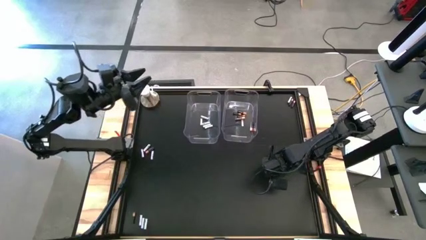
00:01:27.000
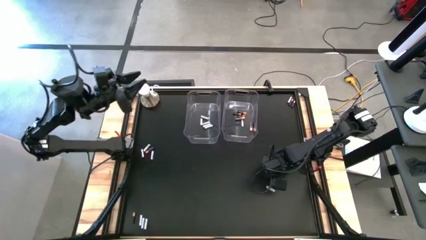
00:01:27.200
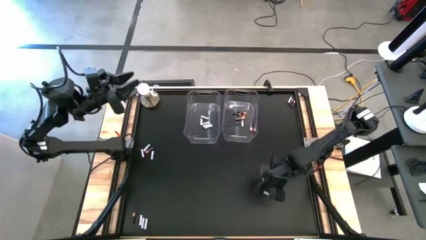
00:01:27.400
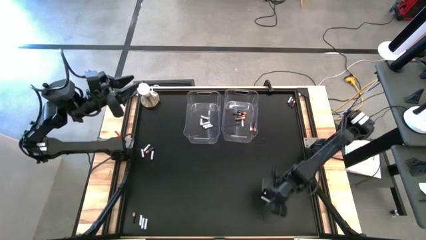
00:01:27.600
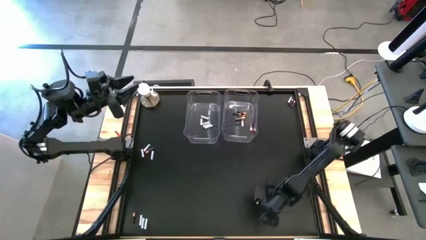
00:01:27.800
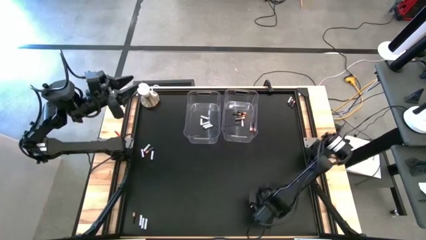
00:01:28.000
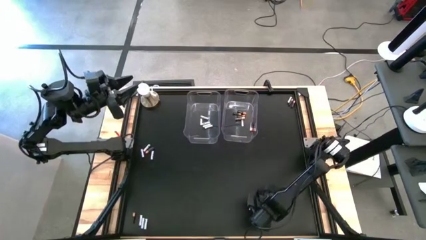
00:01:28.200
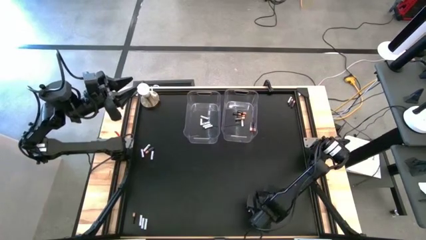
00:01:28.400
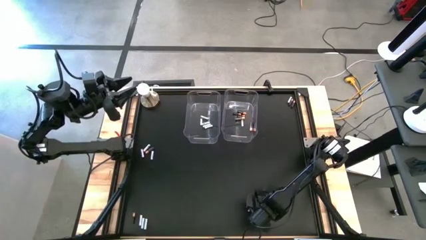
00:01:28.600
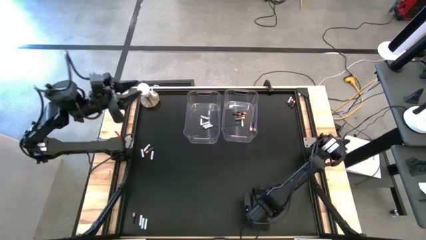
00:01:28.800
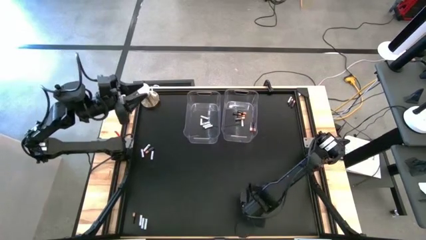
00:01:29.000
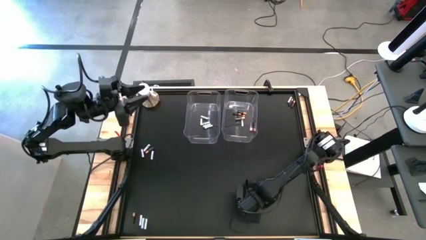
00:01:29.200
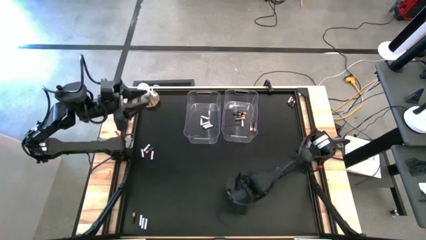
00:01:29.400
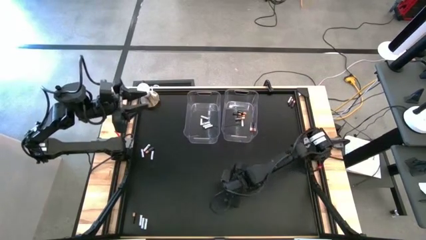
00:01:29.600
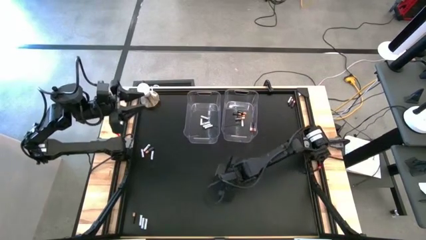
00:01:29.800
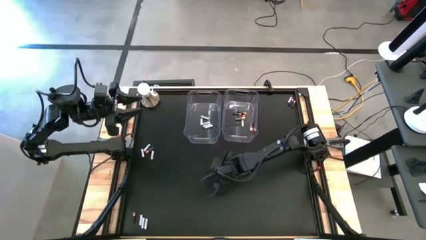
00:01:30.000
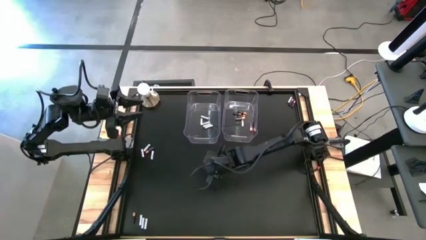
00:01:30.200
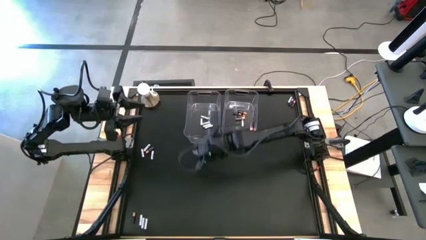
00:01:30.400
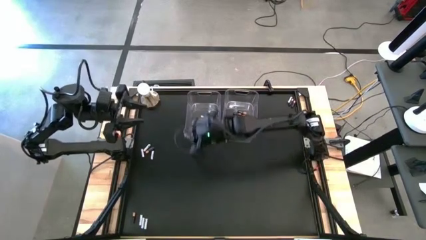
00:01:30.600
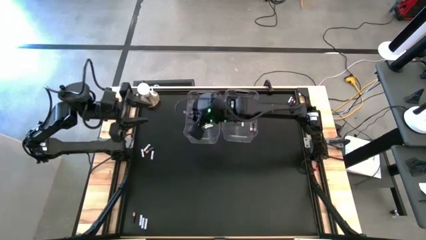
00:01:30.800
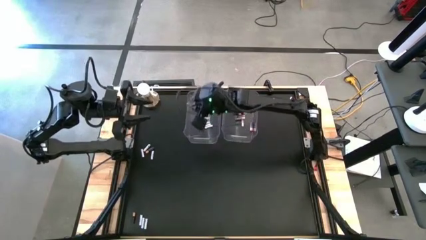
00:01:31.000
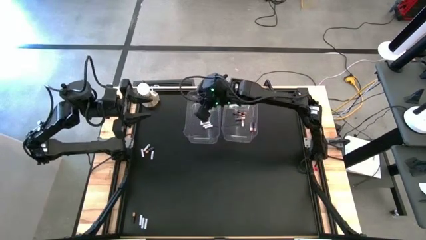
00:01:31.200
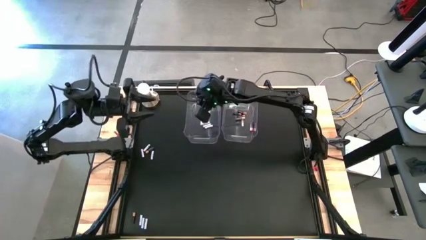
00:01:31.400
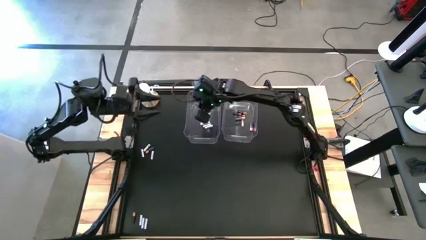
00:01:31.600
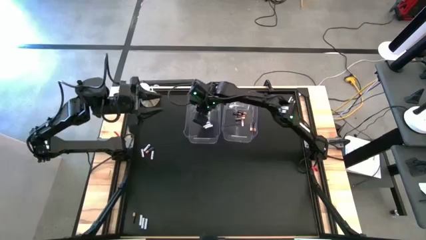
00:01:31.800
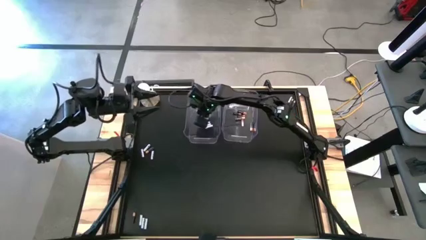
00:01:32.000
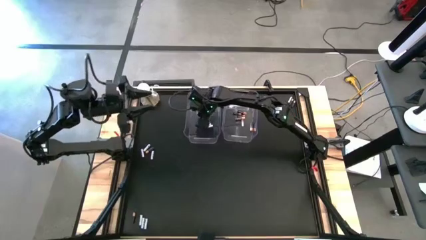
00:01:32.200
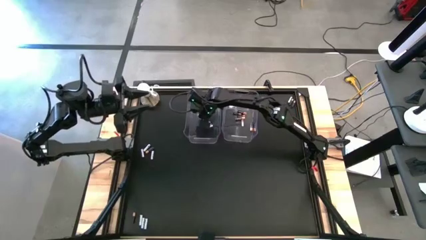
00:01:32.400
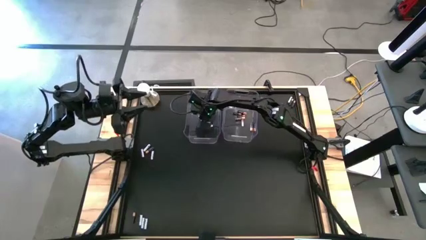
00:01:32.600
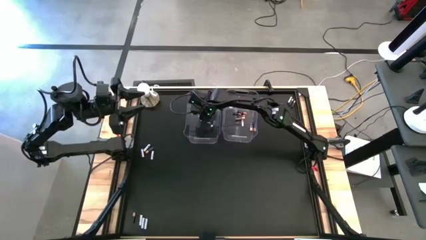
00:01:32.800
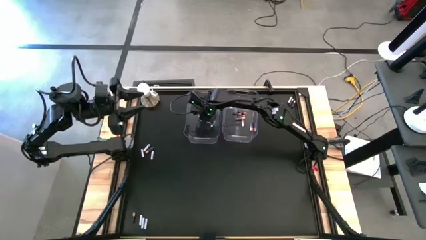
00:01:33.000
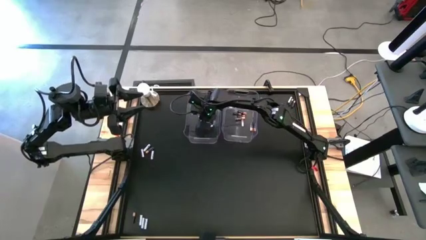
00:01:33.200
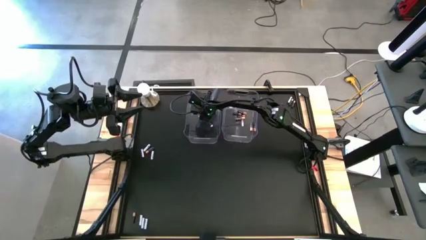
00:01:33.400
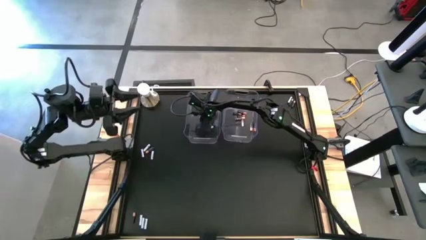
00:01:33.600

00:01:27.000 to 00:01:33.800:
Task: Sort batteries
Put the white battery into the left transparent bin

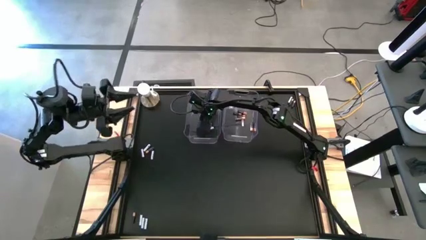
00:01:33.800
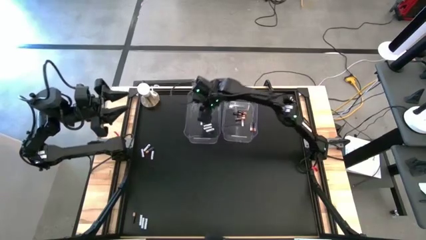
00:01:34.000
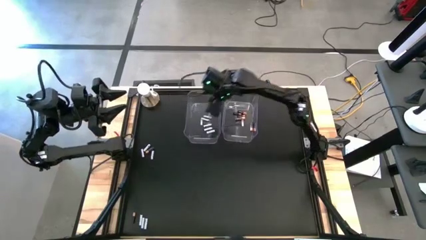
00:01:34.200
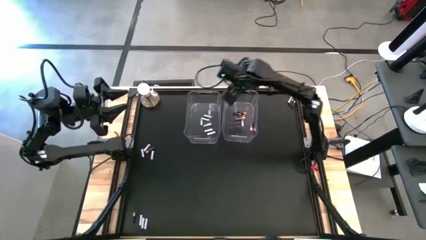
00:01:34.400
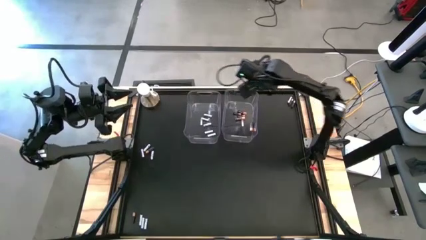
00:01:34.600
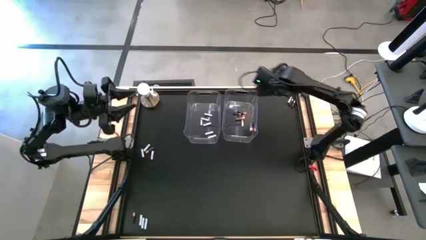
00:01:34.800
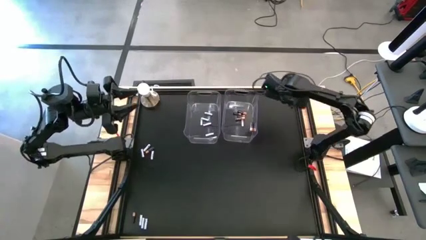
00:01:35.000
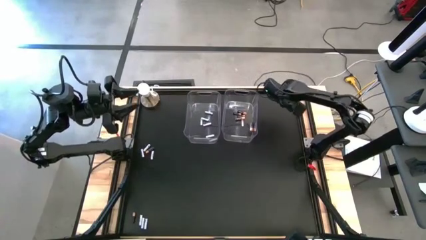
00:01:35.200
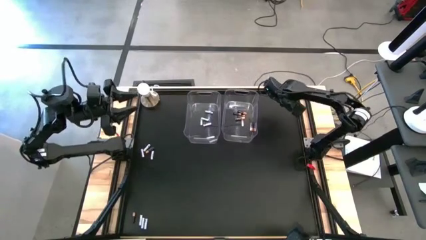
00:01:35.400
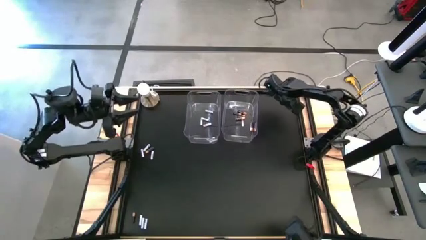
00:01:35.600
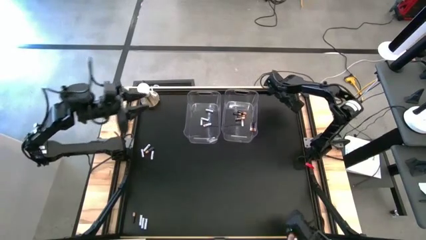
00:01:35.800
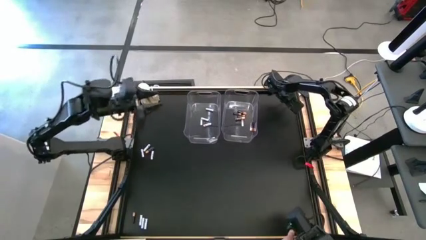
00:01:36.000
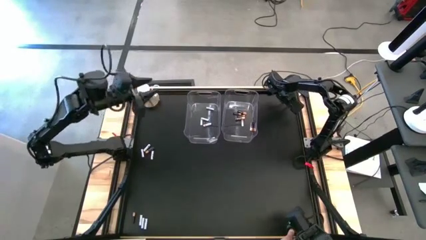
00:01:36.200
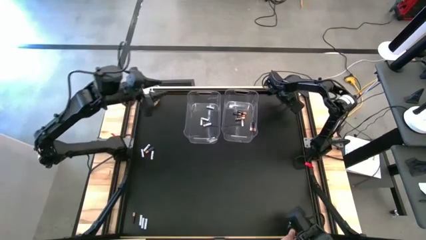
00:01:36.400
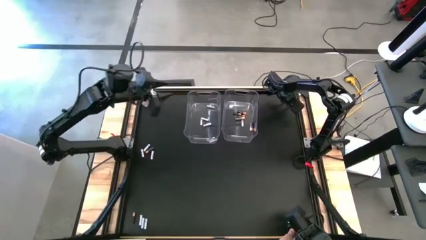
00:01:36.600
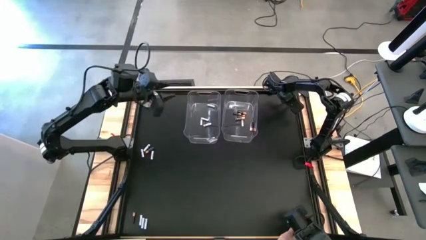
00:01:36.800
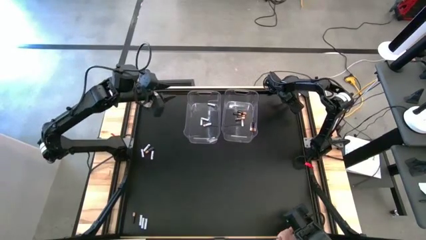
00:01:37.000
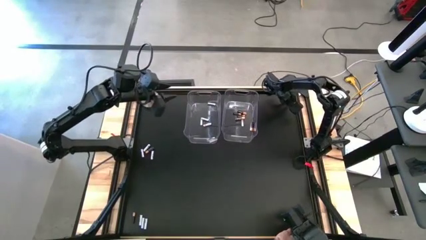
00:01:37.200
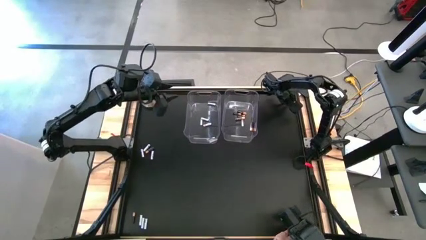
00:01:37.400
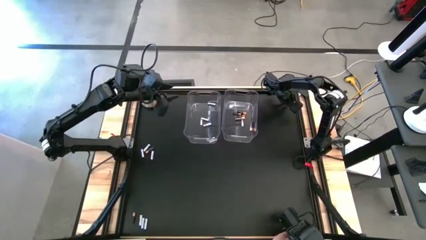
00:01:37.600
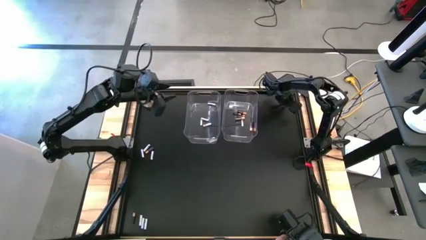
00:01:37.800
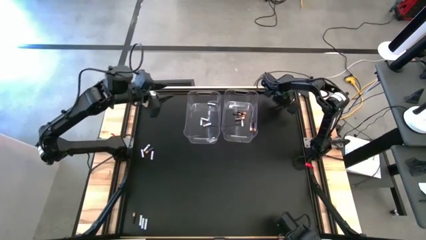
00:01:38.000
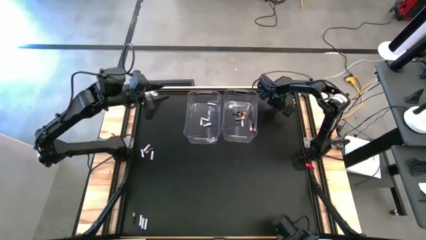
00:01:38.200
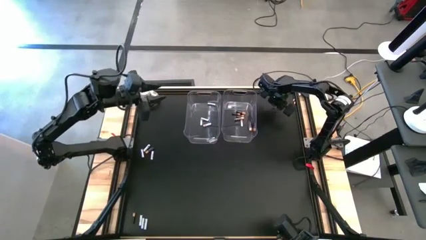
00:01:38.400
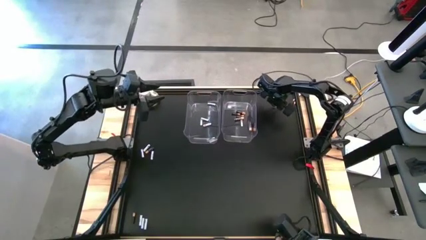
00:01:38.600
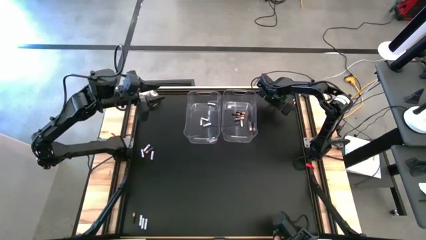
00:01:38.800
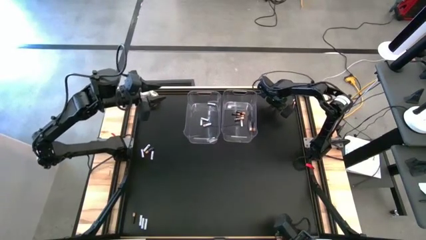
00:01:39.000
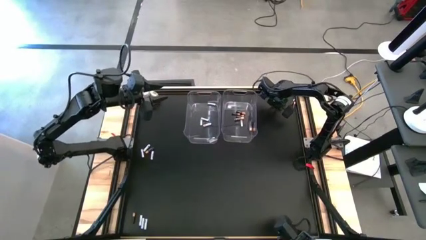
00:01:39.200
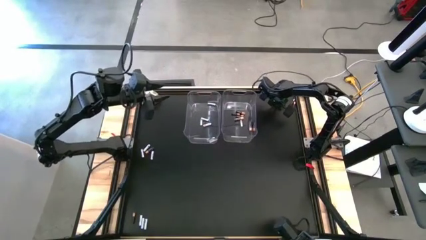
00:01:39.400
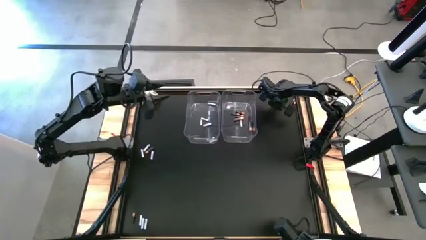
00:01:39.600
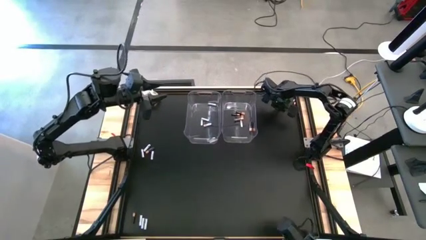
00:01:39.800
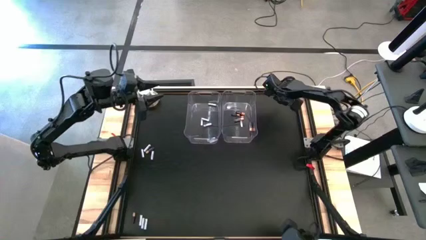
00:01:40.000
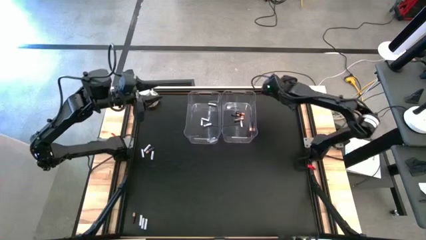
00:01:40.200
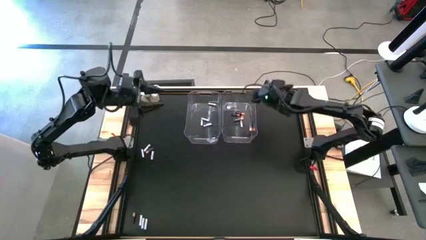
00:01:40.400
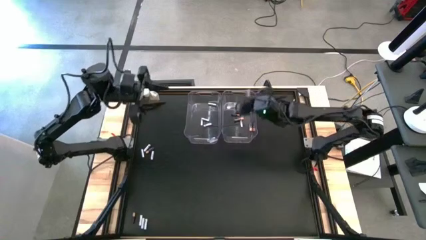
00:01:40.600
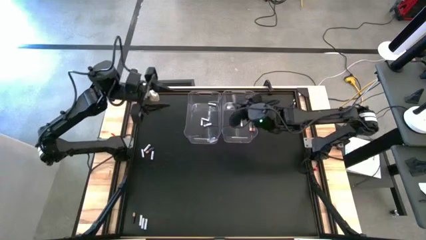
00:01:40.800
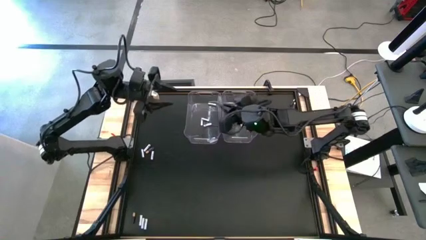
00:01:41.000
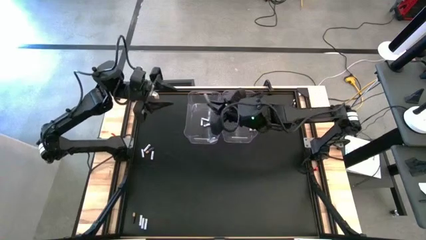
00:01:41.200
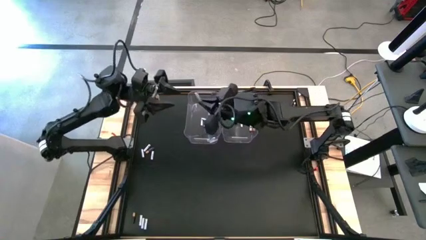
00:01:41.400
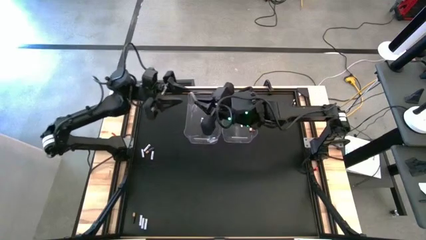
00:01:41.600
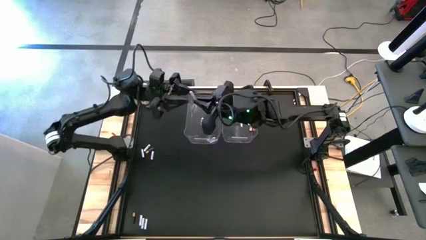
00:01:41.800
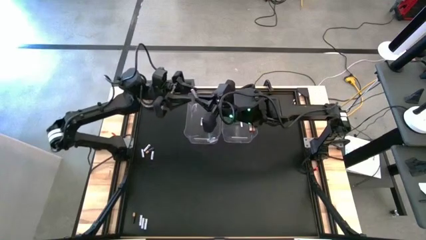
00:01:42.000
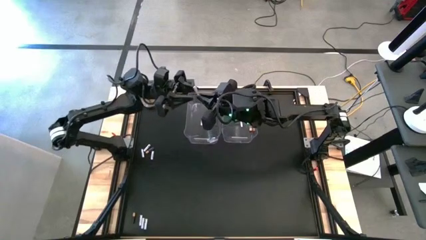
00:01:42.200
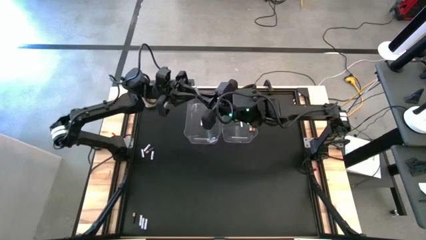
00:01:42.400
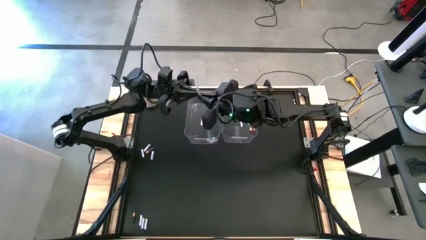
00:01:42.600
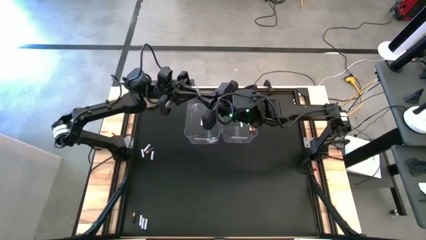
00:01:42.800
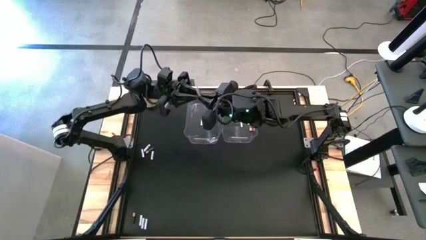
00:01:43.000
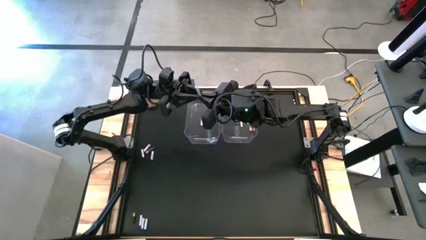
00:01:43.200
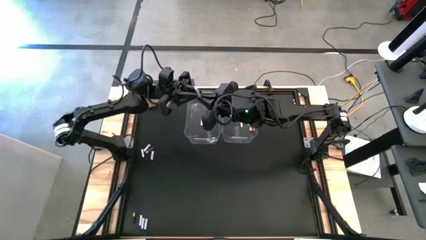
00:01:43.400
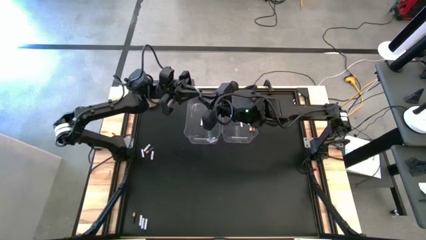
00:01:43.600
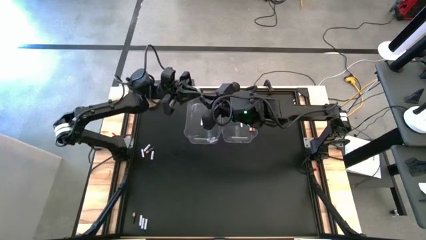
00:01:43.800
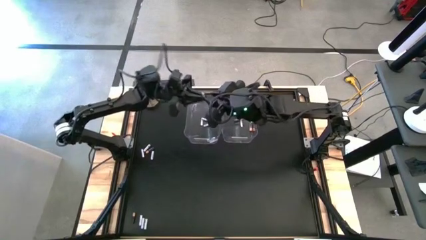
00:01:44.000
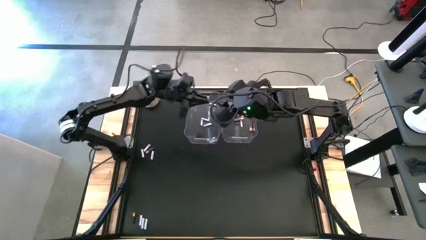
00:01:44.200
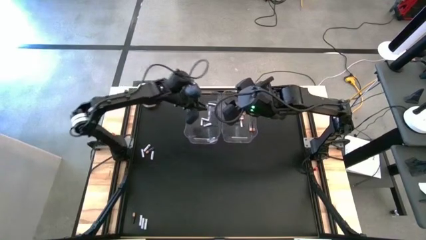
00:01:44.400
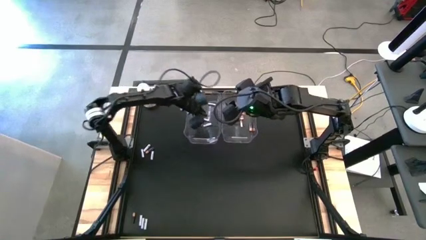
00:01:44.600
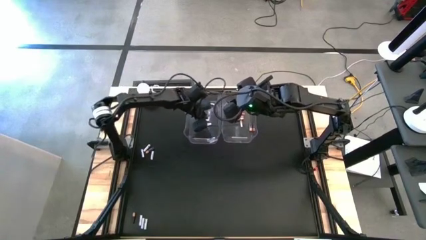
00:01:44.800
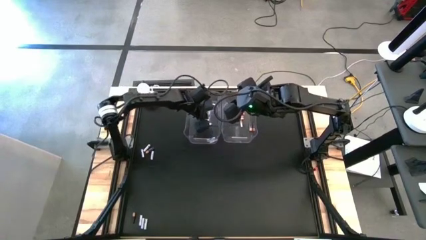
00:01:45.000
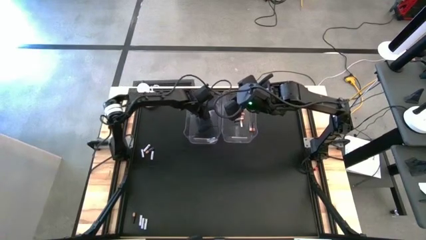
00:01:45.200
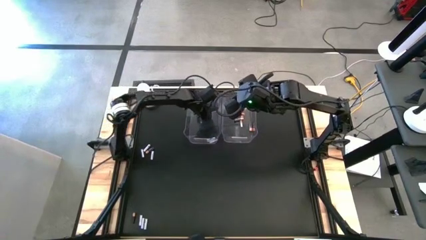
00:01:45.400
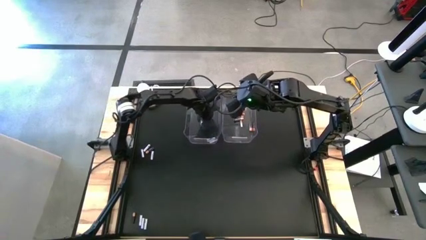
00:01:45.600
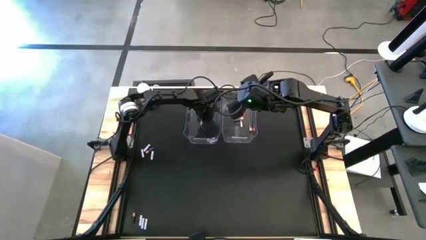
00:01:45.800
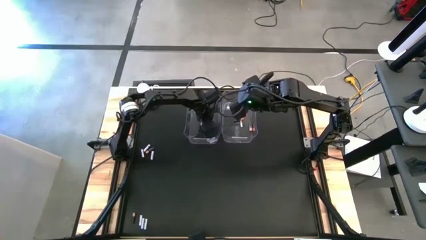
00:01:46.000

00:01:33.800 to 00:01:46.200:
Put the white battery into the left transparent bin
